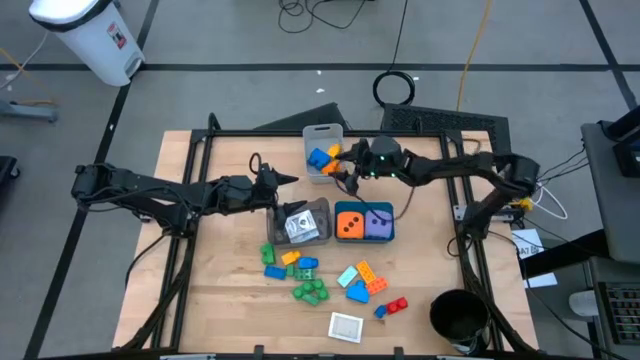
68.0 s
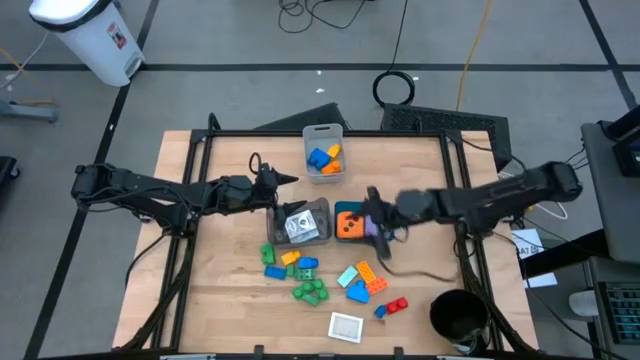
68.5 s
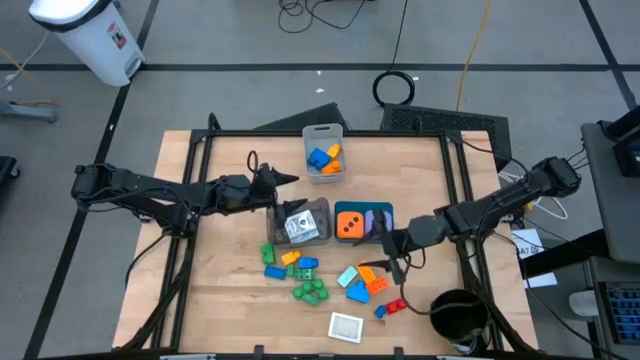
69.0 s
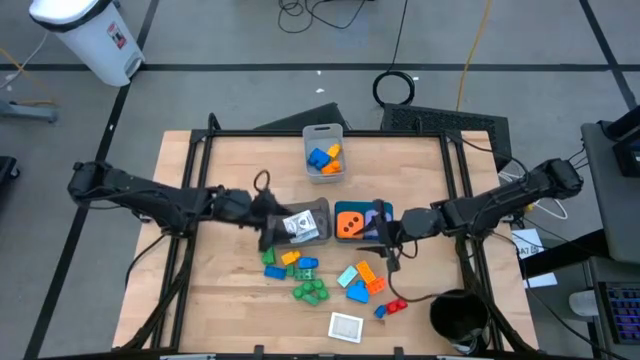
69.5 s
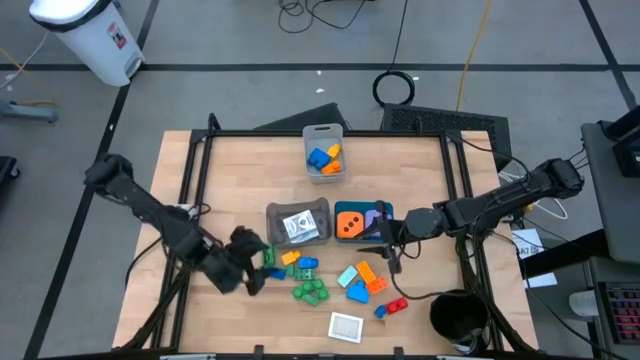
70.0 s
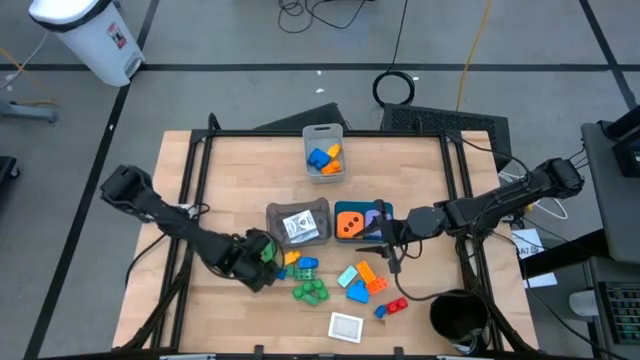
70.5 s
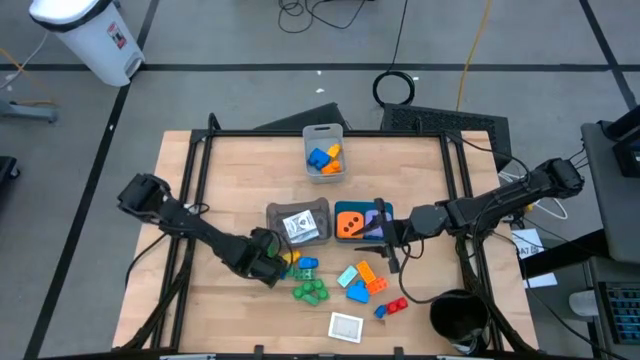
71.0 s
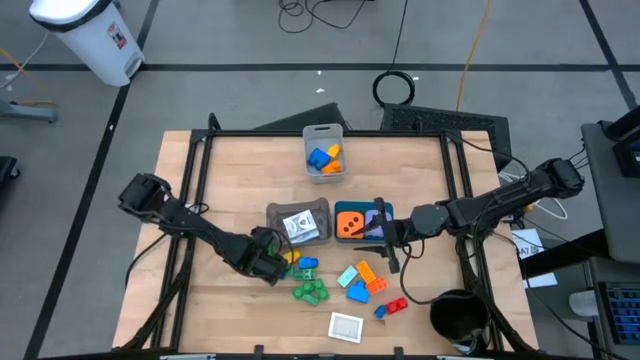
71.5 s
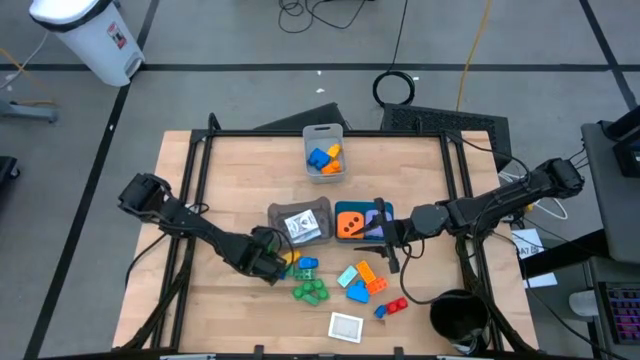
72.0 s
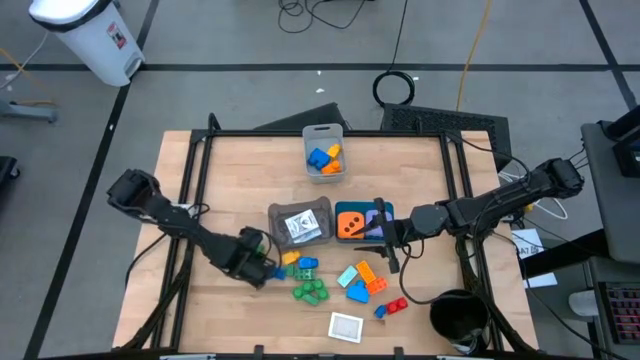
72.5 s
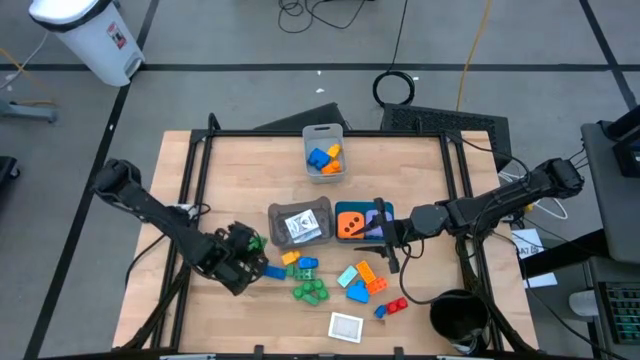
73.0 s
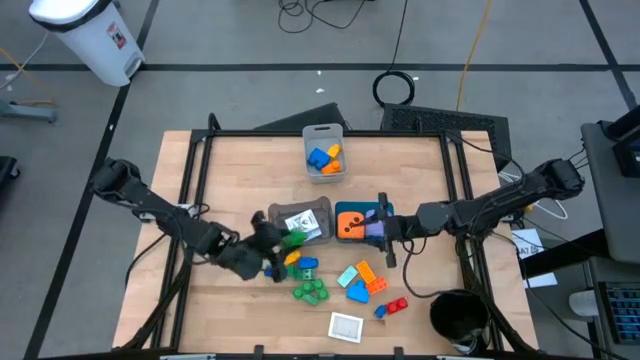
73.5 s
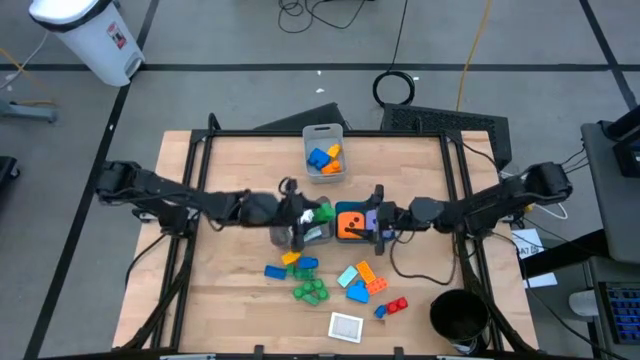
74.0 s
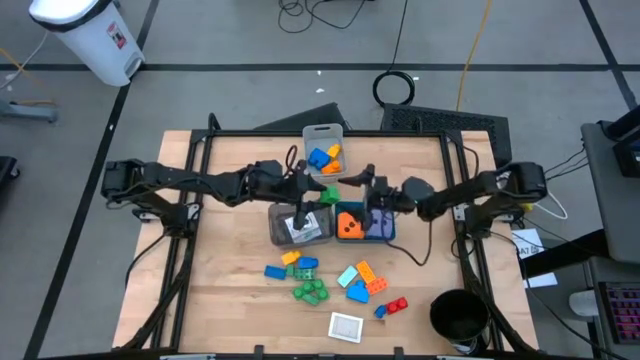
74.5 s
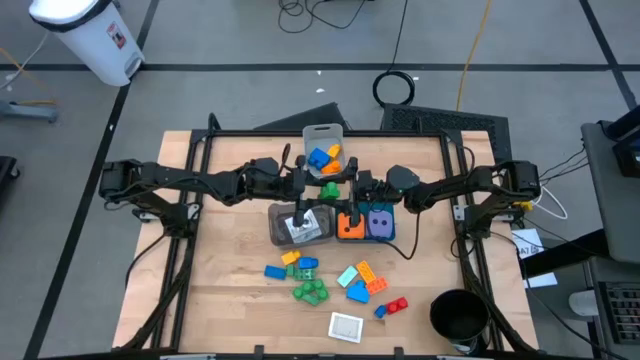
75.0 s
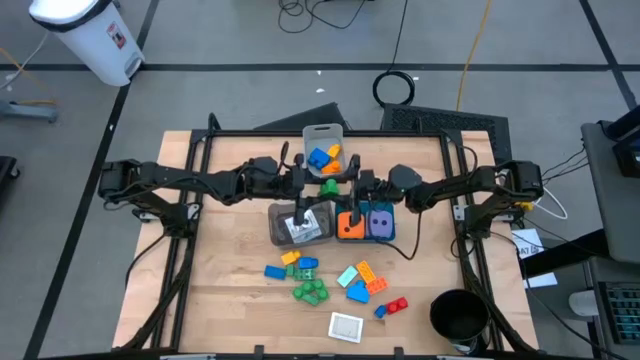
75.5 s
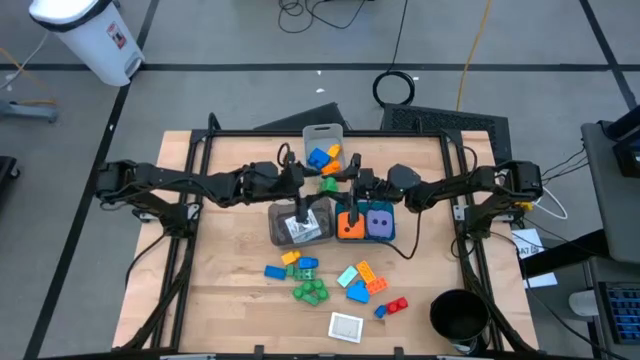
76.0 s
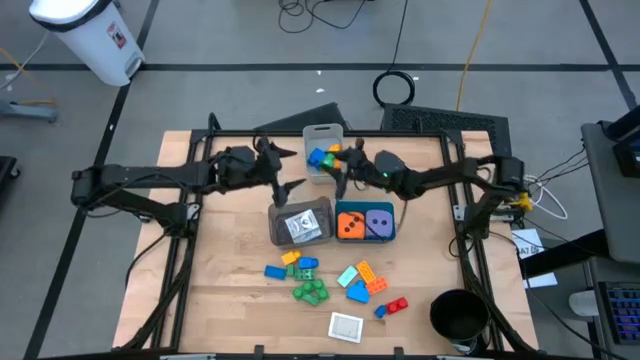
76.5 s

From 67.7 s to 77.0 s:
Task: Pick & Place Toys
Put the green game piece into the gray bin

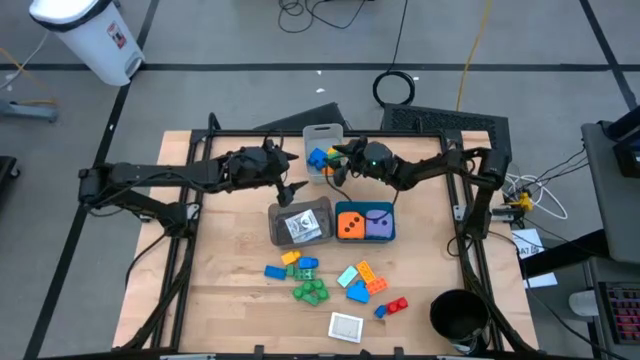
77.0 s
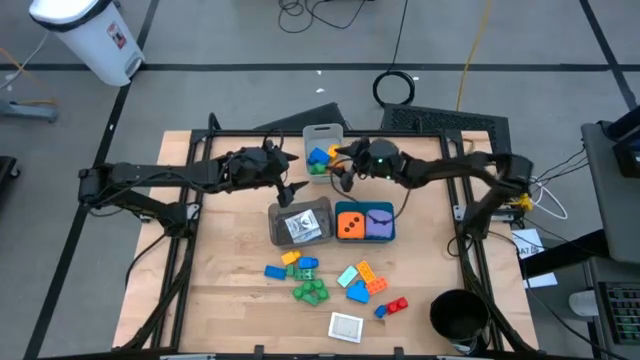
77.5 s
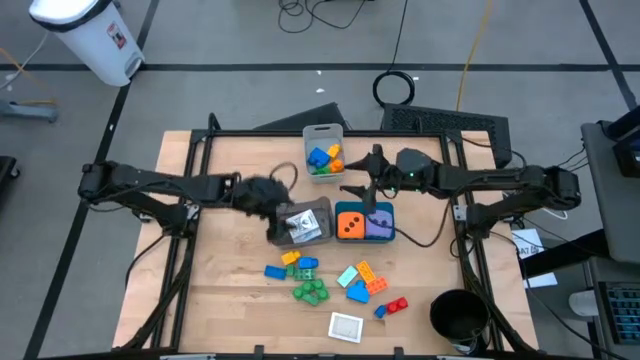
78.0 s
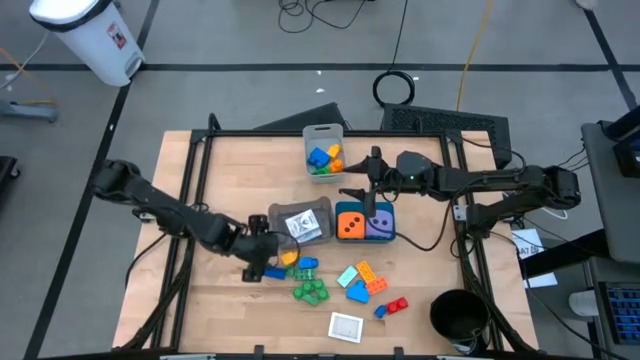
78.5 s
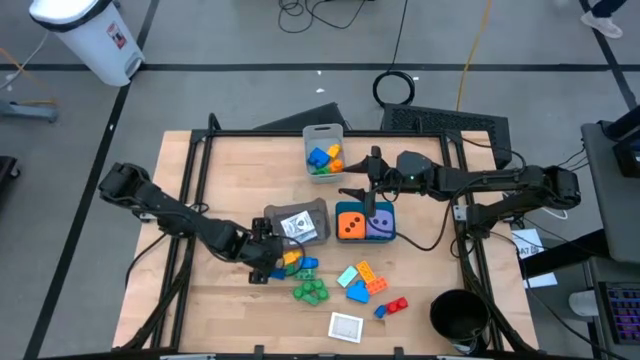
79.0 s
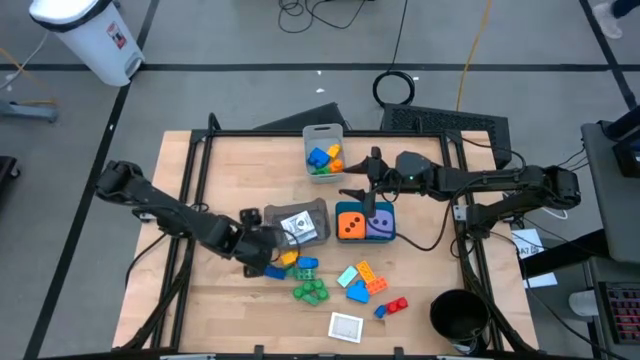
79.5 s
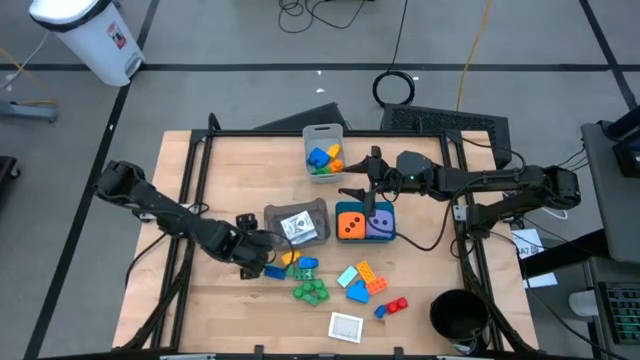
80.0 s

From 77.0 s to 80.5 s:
Adjust the black bin

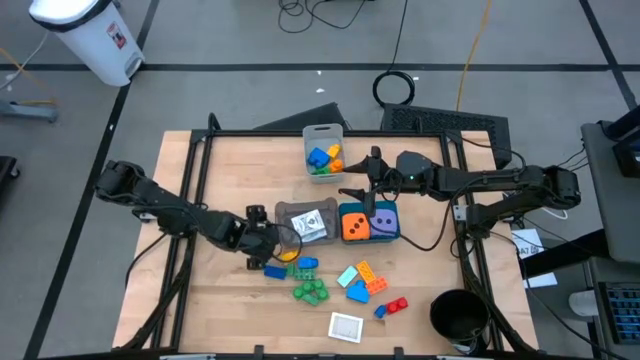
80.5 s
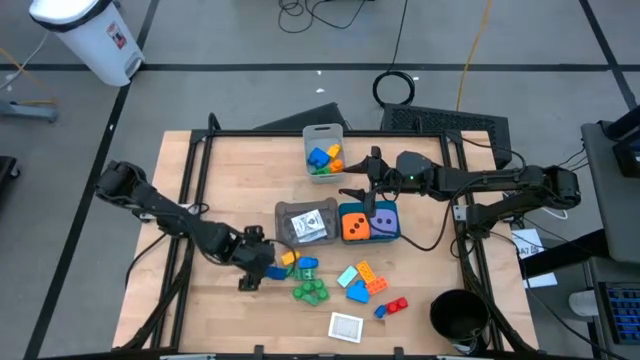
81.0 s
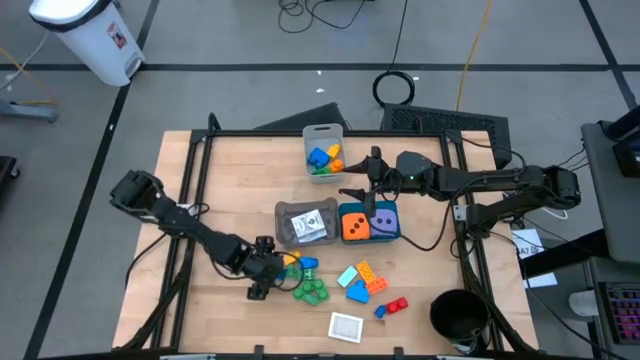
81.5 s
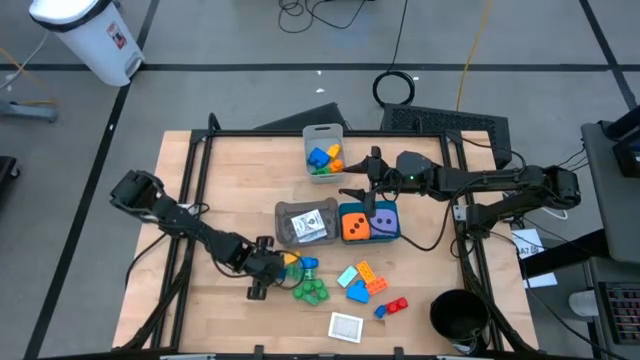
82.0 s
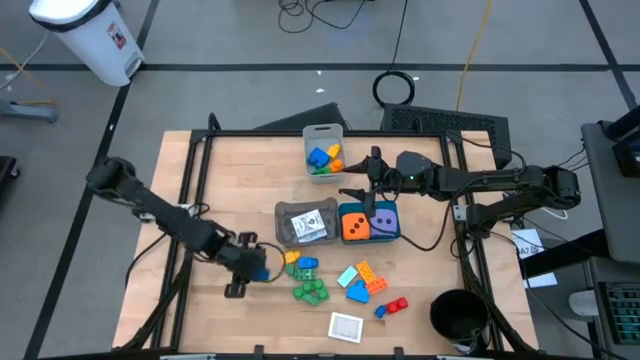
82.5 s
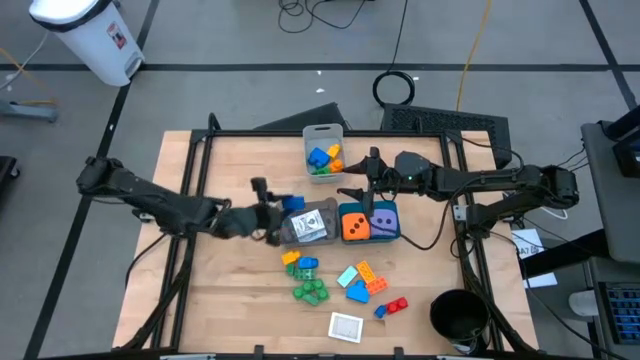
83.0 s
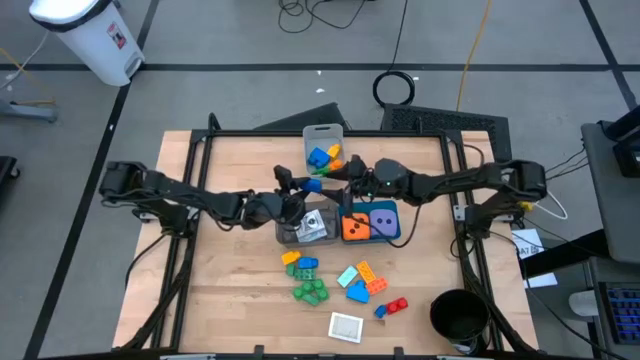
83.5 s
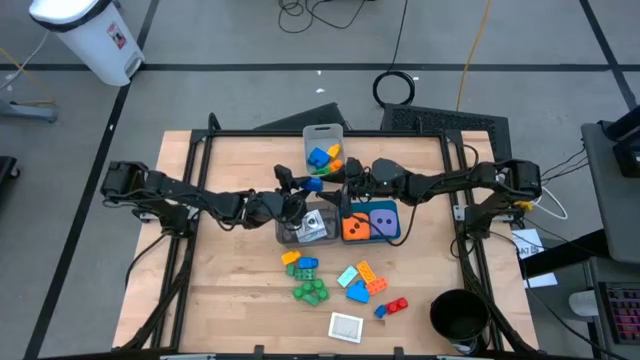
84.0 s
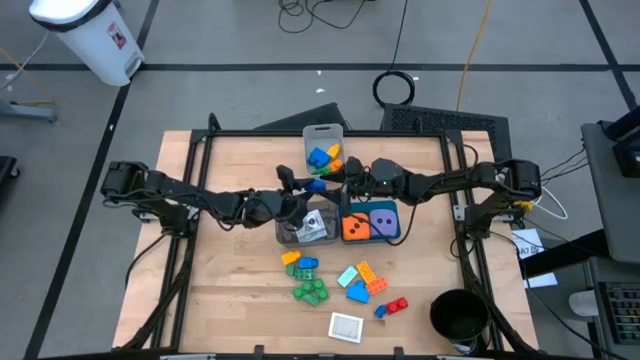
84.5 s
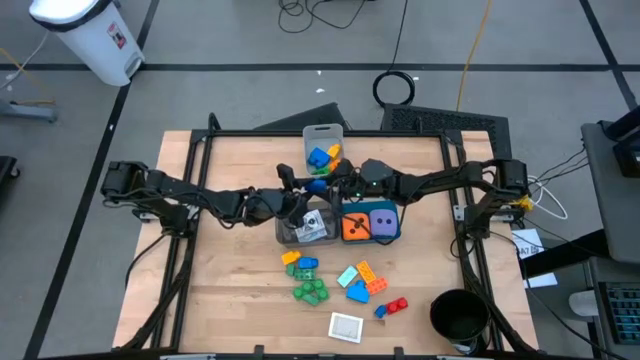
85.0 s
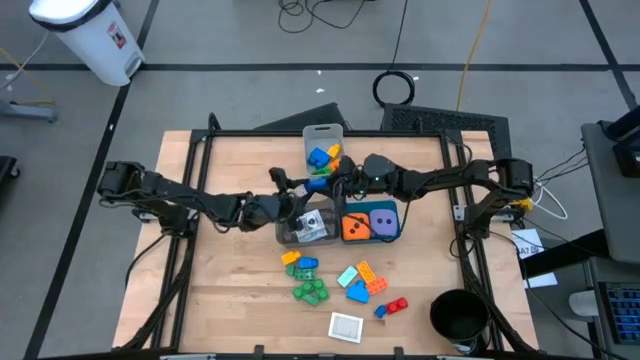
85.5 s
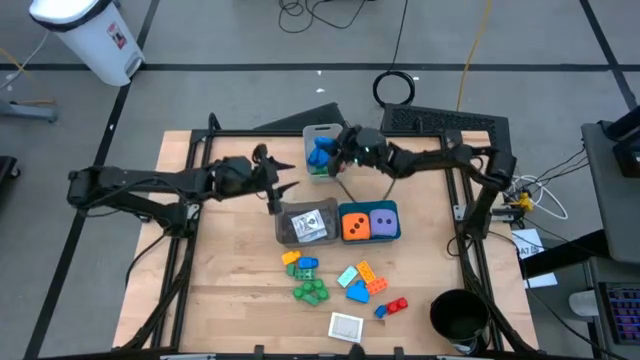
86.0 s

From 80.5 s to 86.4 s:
Put the blue game piece into the gray bin

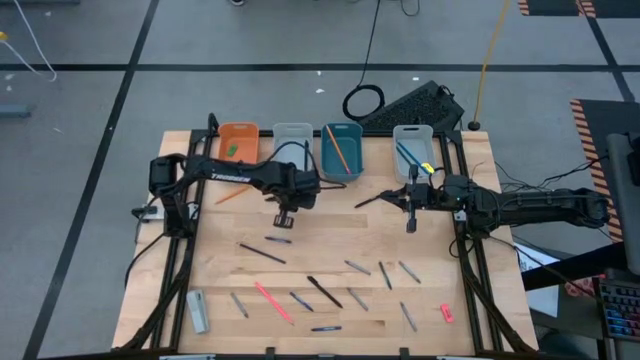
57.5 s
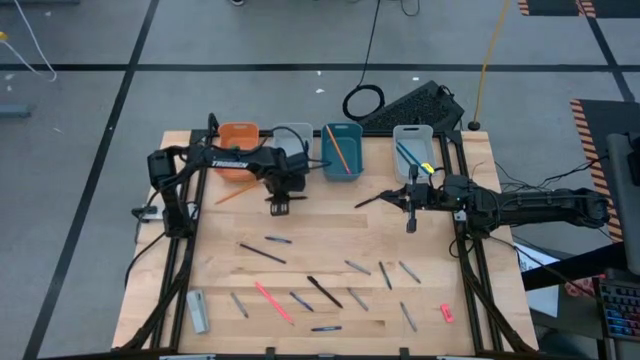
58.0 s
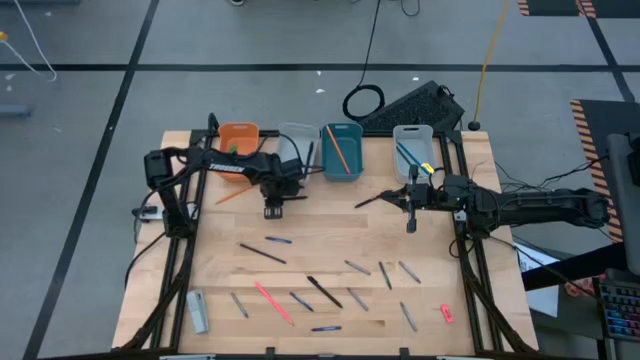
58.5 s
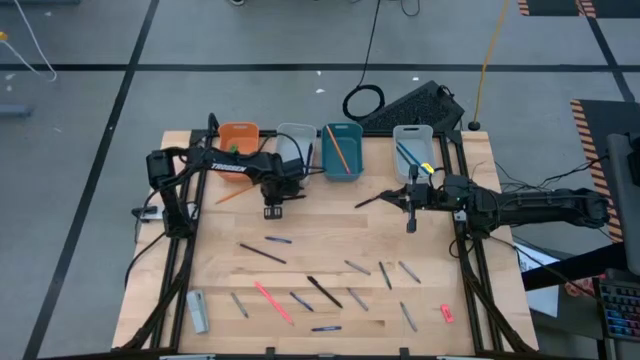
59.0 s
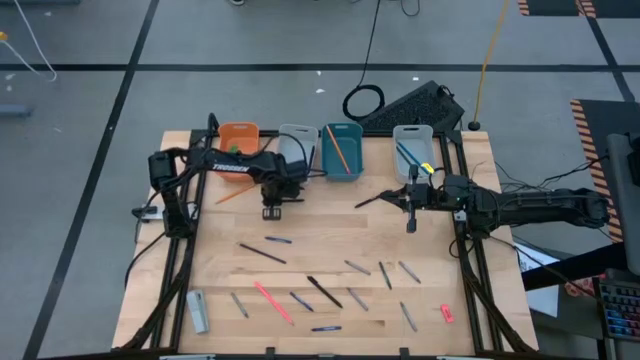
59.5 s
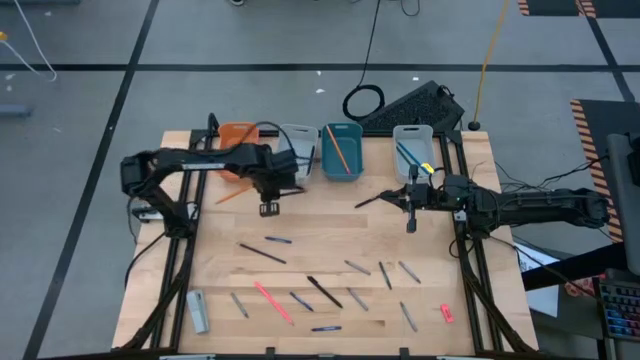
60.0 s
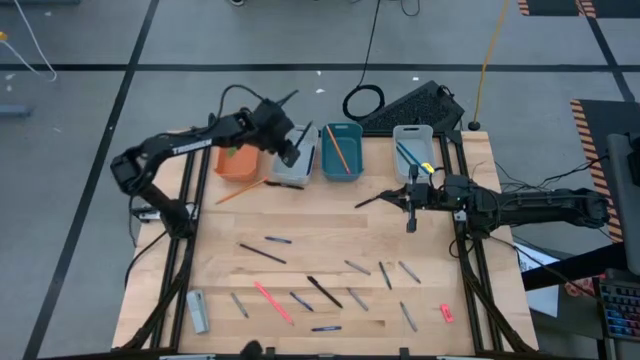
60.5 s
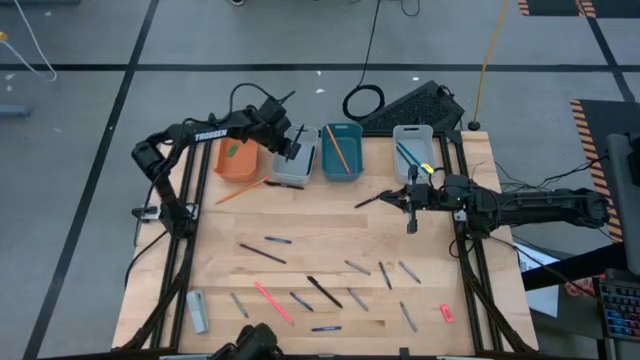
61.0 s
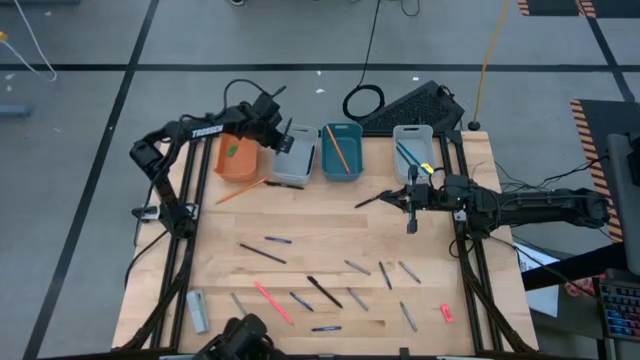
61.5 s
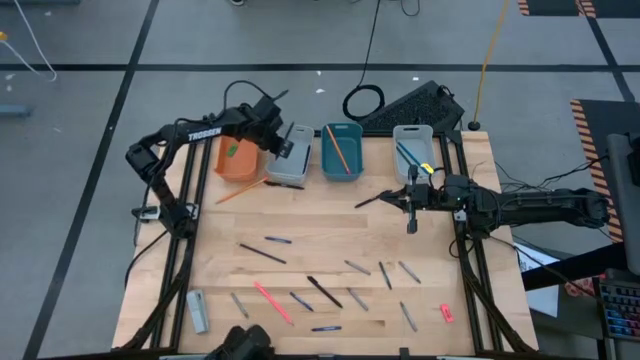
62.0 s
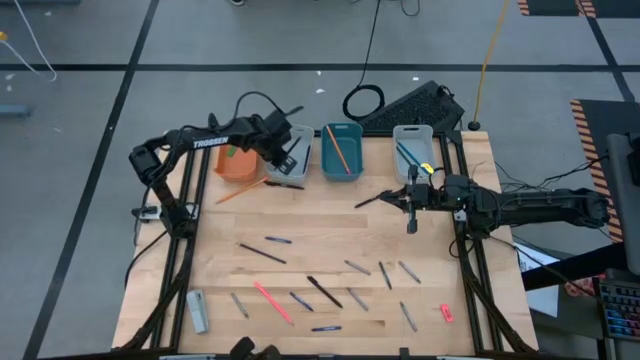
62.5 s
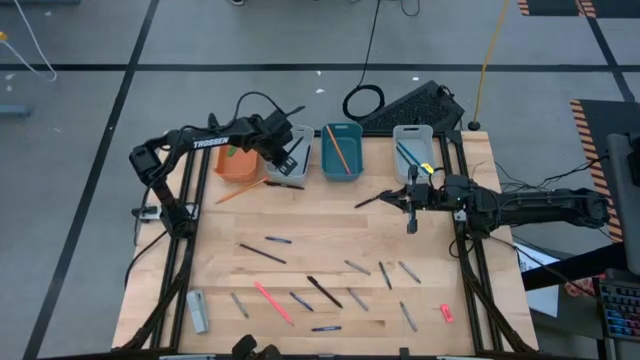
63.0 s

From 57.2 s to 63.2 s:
Task: Sort crayons/erasers/pens/pencils in bins
Put the black pen into the left gray bin
